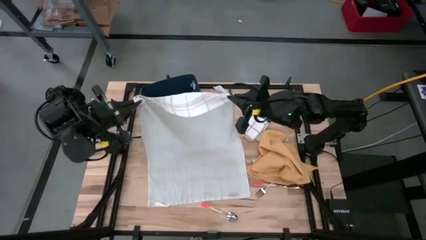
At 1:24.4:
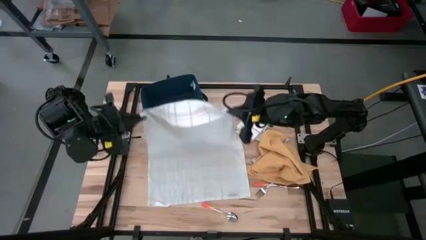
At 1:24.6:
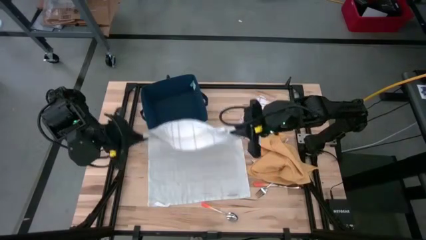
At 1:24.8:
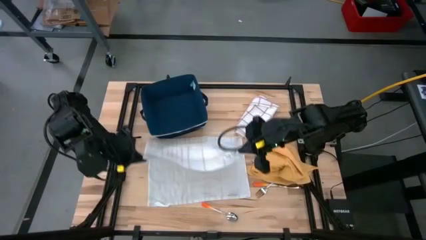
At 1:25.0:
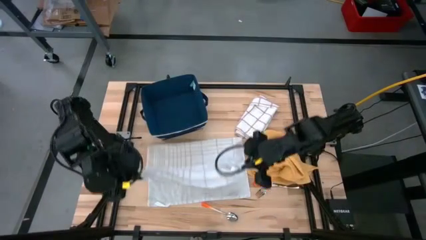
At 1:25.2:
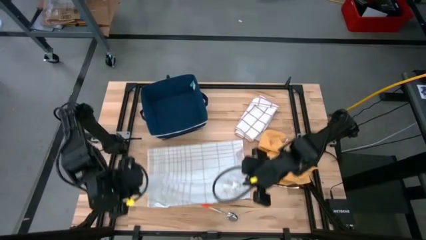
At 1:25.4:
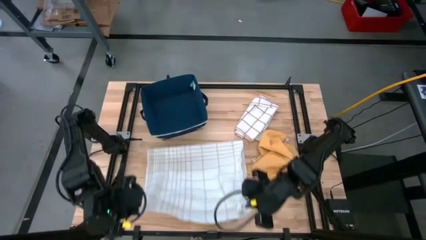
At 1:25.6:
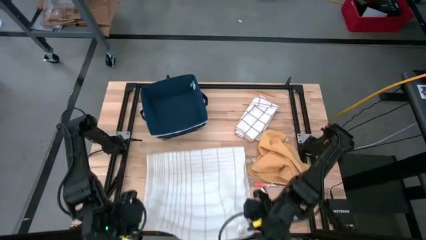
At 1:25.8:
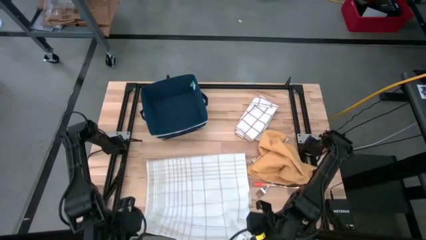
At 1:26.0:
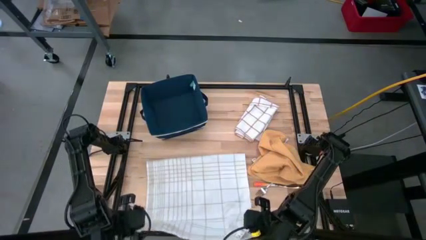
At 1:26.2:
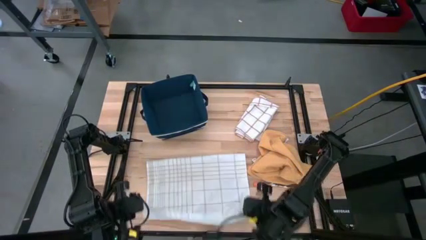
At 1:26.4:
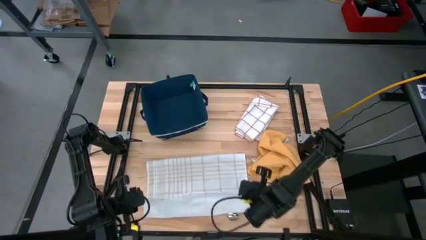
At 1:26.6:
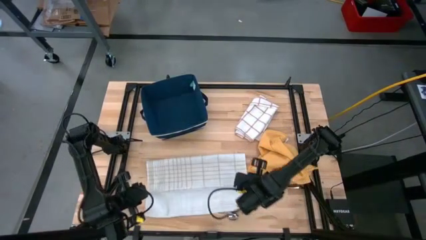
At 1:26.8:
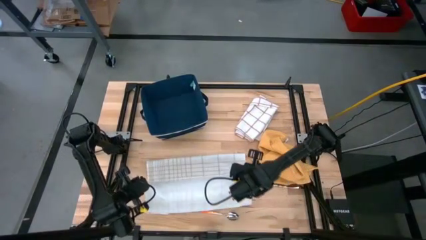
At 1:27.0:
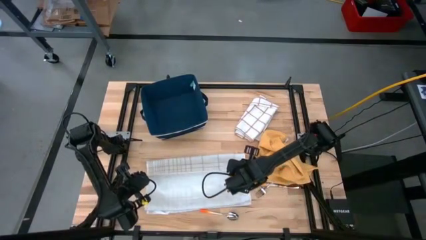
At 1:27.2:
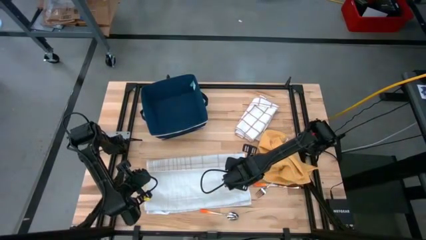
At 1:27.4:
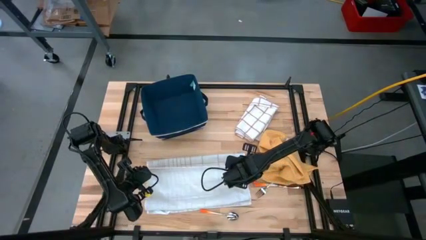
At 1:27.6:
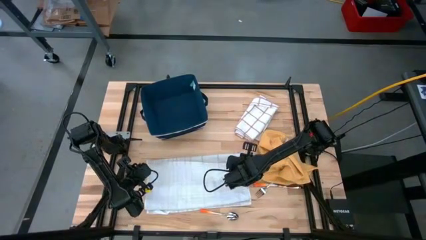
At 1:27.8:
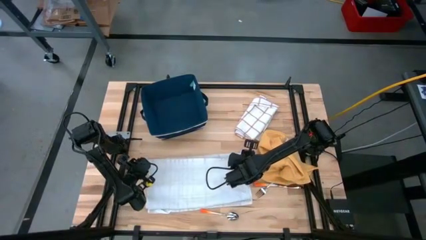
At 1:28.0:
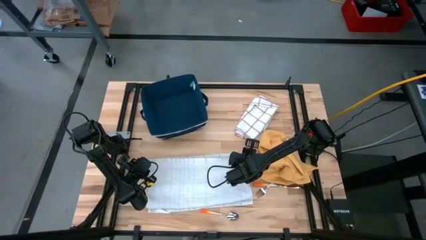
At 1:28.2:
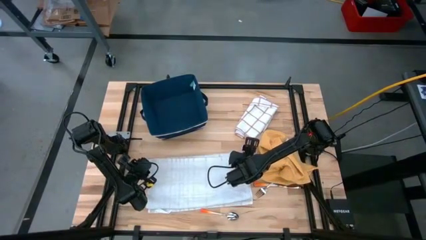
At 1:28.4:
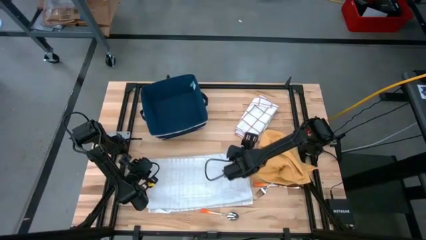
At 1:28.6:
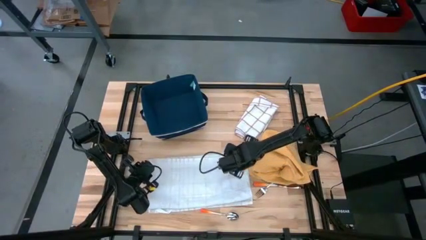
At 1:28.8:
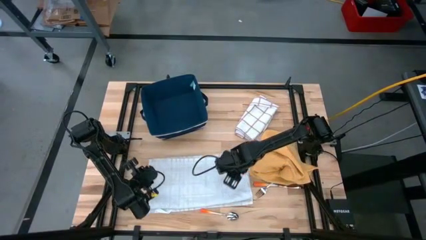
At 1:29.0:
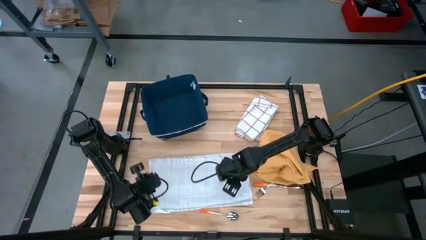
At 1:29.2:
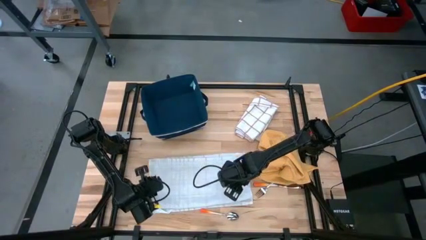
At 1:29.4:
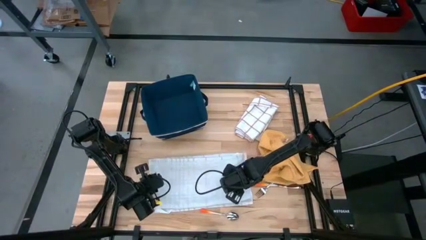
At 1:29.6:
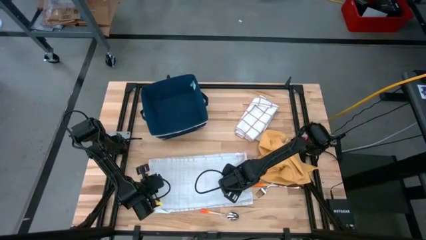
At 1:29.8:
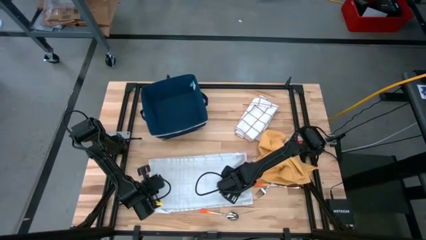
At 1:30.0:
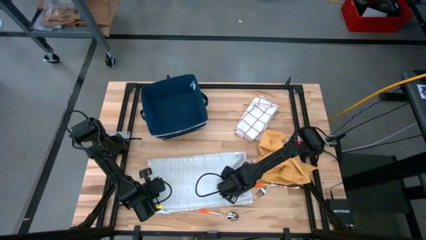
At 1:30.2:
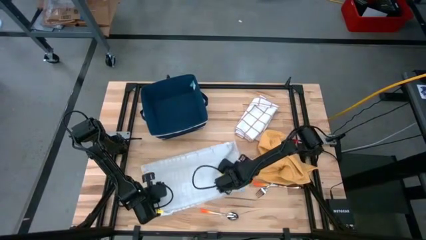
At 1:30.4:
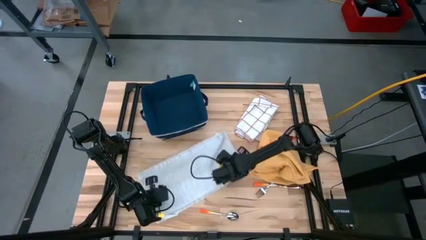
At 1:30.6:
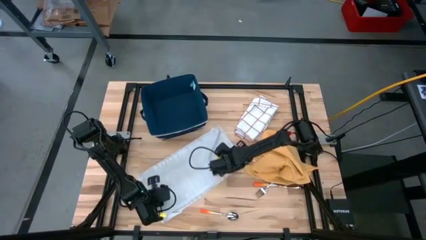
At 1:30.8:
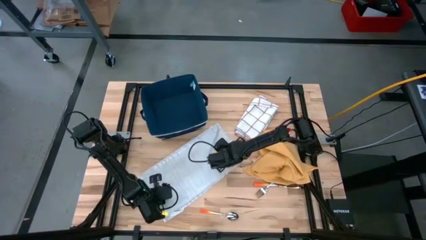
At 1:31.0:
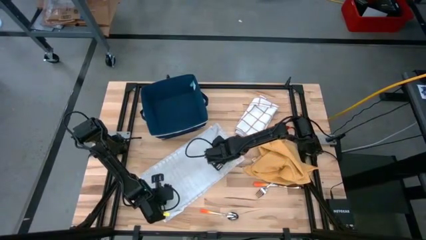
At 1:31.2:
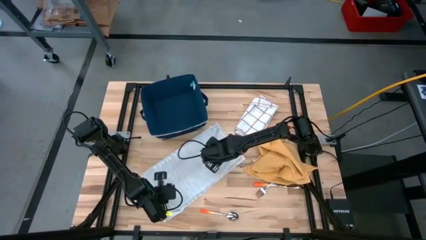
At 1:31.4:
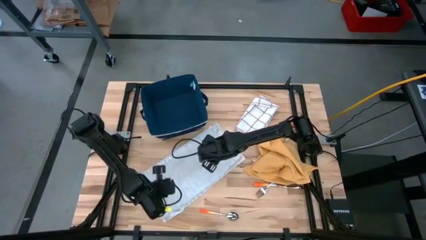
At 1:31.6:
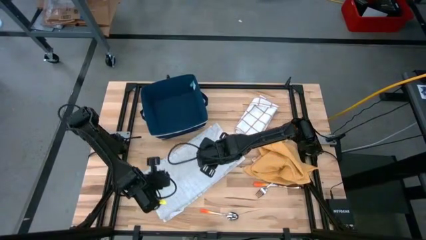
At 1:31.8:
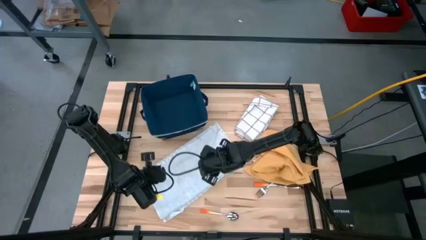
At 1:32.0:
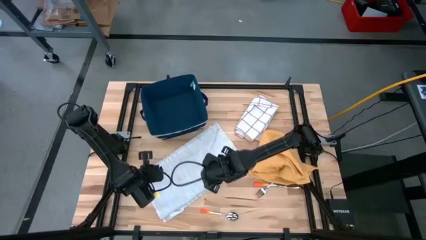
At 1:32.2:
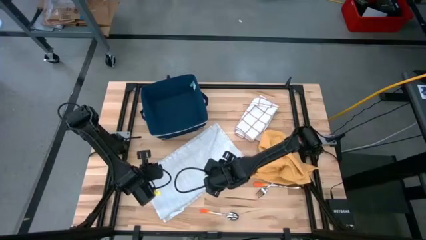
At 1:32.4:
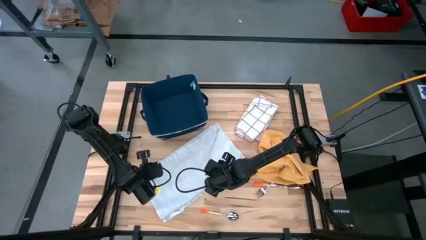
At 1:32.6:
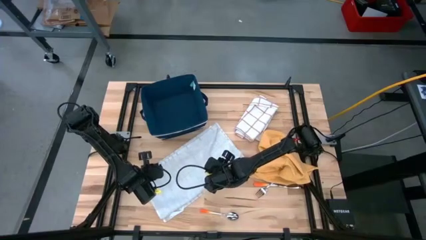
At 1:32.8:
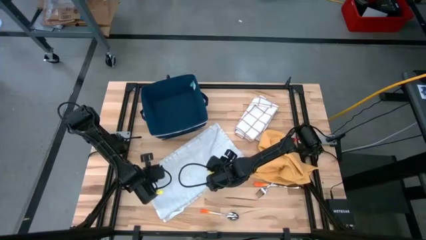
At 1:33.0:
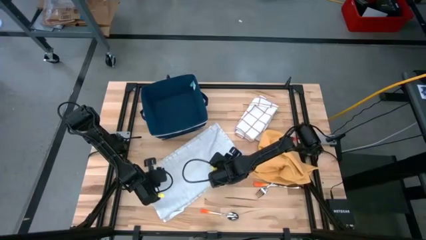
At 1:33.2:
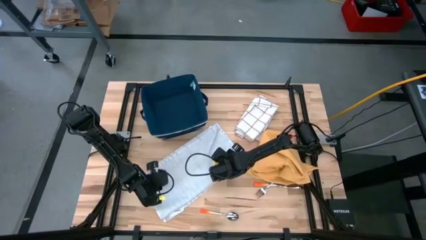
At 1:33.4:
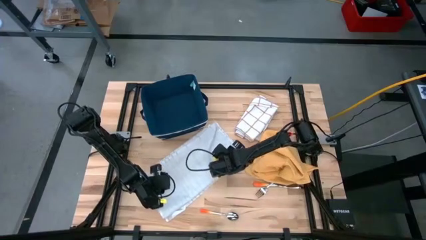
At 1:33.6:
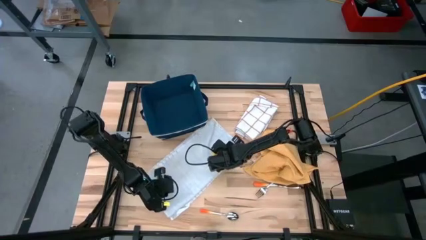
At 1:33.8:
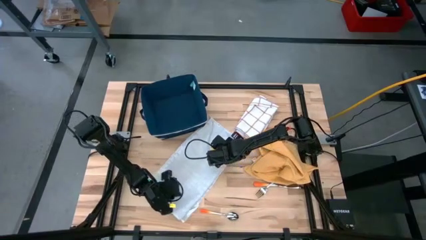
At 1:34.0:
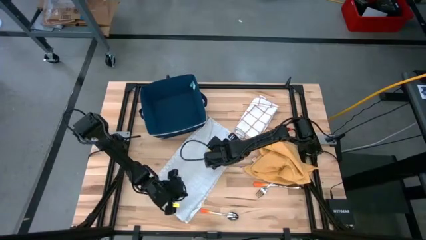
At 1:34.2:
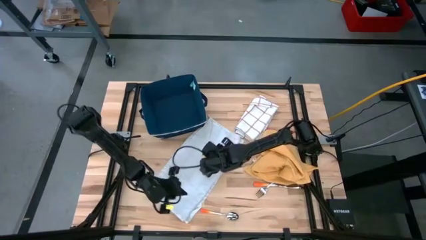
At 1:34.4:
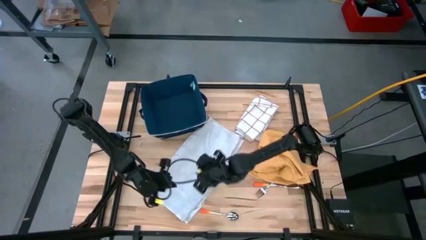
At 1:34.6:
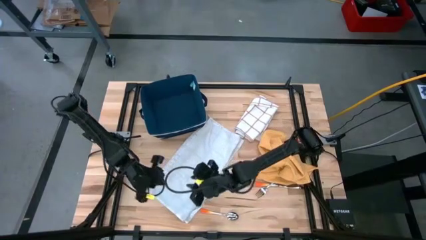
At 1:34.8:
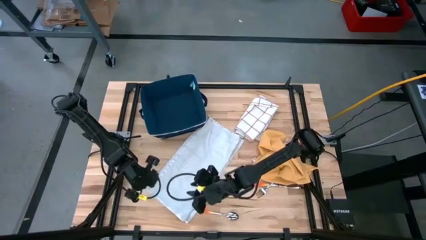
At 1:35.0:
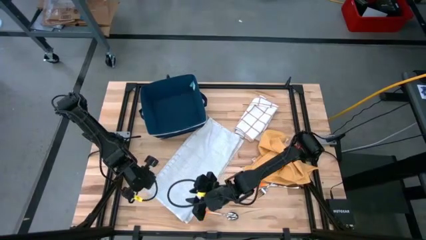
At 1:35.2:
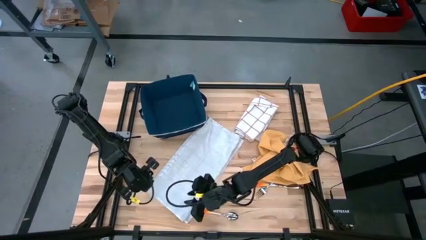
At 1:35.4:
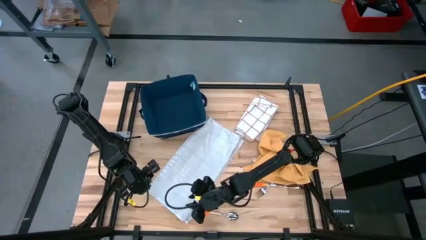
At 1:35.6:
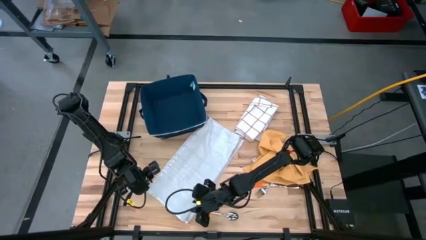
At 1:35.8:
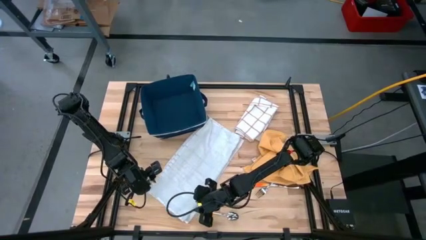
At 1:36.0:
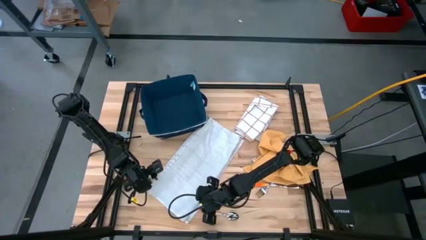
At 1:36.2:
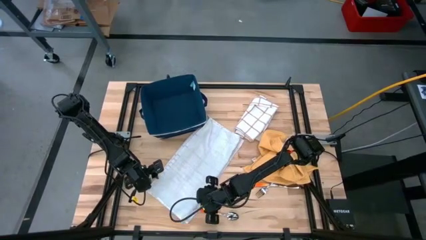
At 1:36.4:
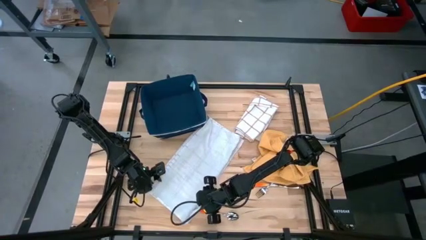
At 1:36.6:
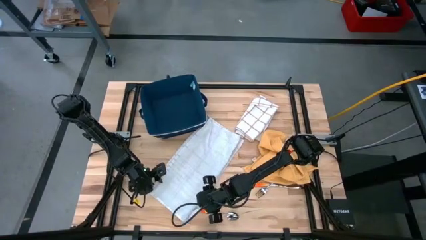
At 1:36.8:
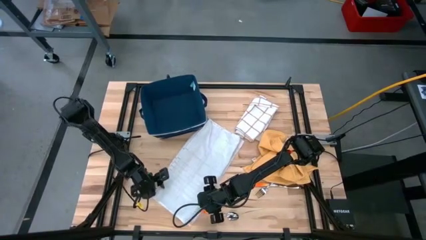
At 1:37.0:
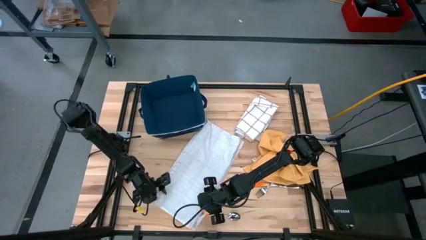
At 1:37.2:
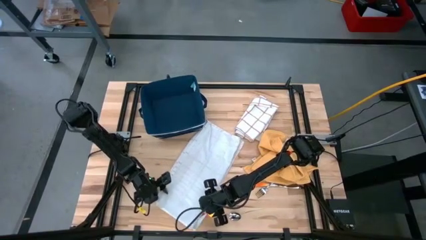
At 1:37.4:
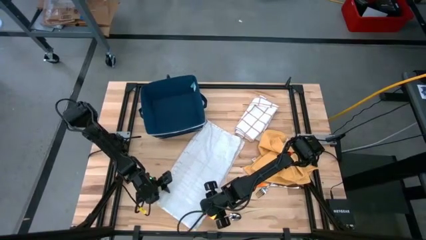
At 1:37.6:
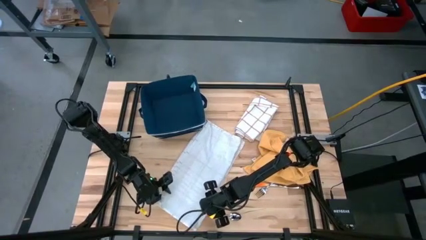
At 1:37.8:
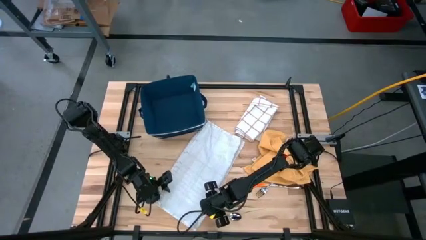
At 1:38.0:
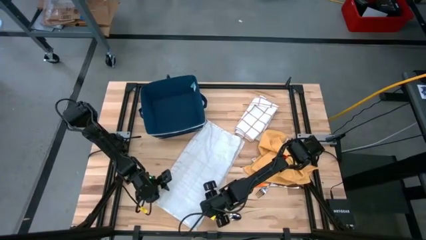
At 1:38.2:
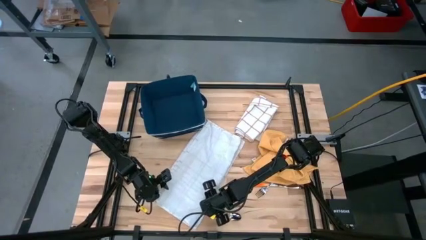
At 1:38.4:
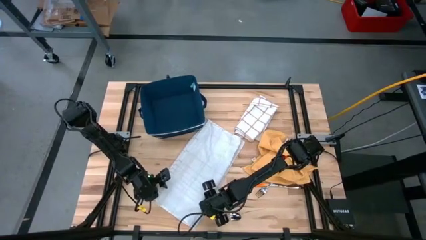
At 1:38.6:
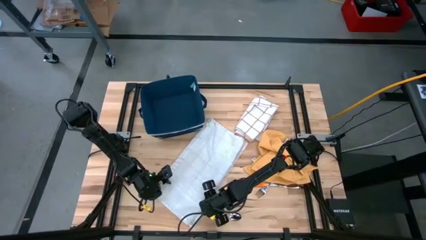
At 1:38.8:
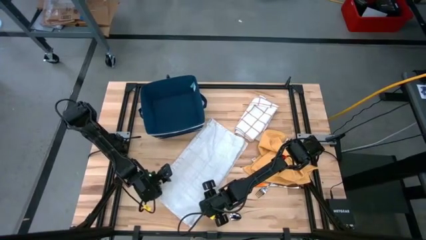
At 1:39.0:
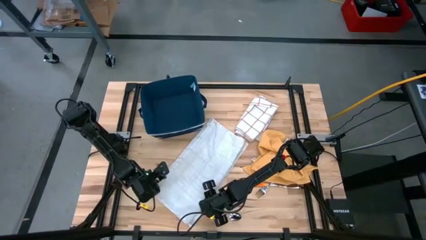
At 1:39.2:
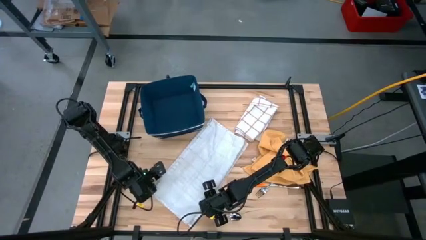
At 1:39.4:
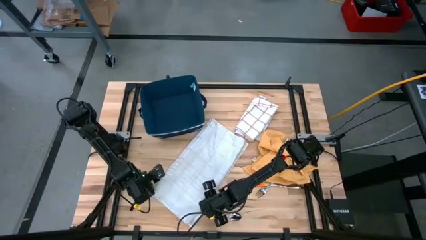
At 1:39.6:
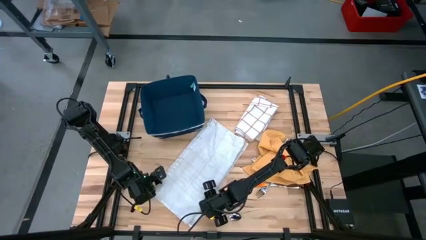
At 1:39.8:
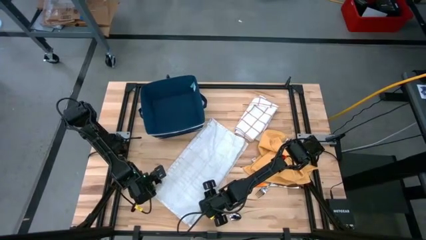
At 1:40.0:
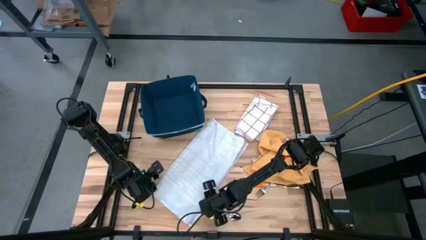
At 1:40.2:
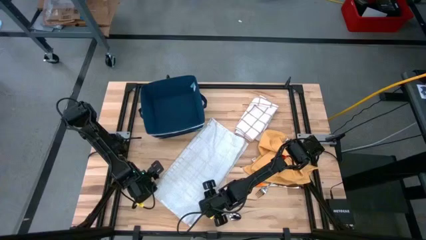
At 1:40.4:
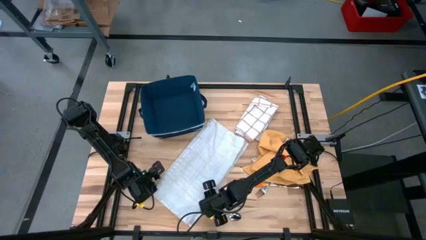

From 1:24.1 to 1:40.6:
Task: Fold towel
Fold the left white patterned towel
